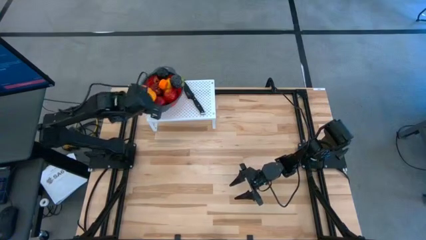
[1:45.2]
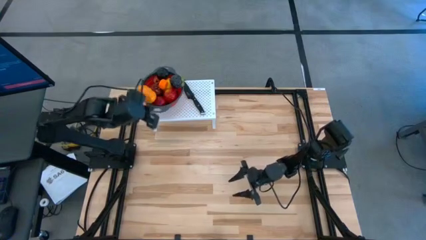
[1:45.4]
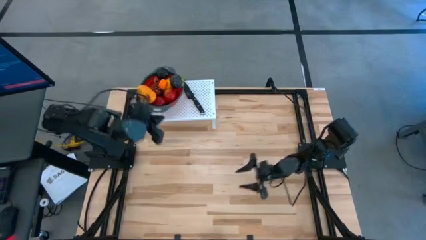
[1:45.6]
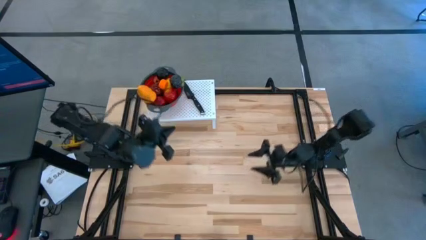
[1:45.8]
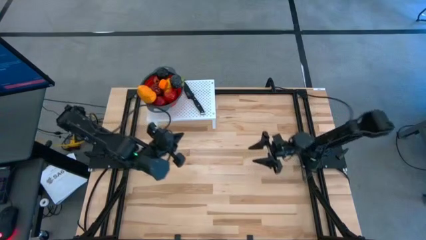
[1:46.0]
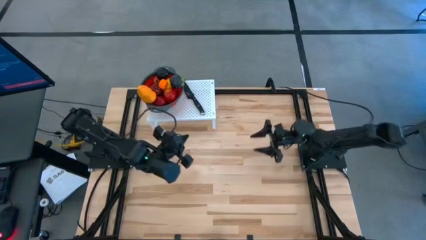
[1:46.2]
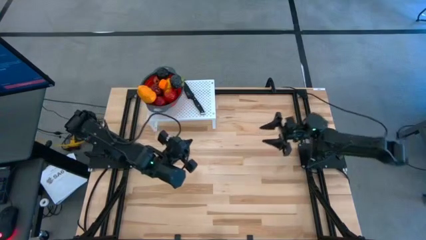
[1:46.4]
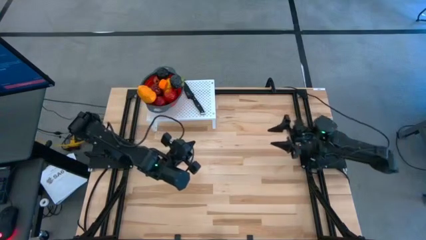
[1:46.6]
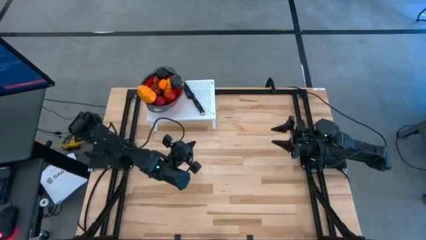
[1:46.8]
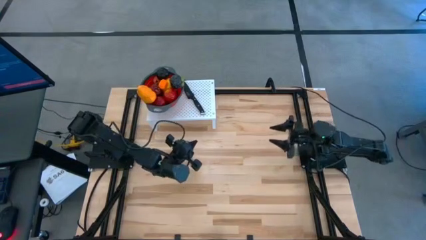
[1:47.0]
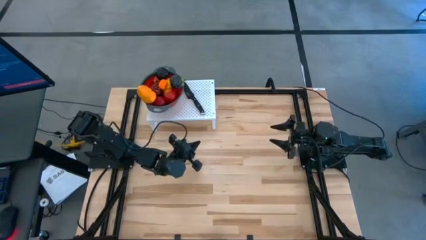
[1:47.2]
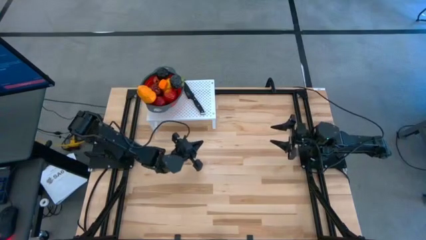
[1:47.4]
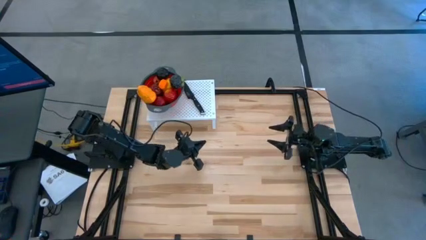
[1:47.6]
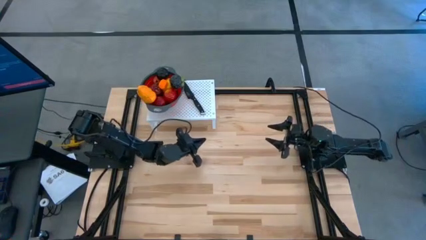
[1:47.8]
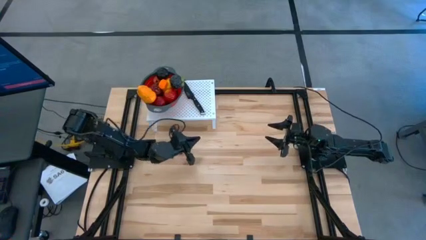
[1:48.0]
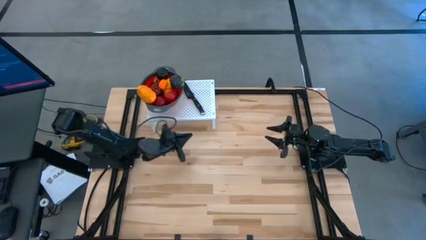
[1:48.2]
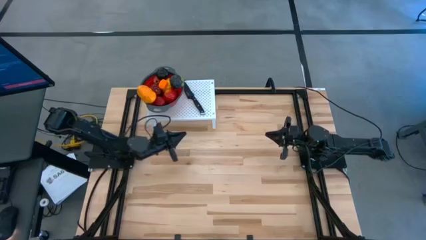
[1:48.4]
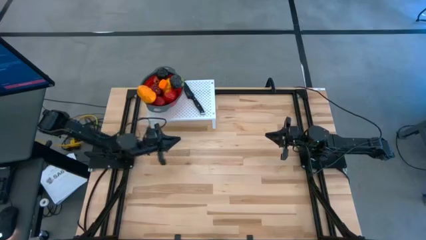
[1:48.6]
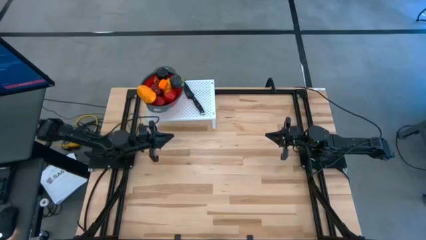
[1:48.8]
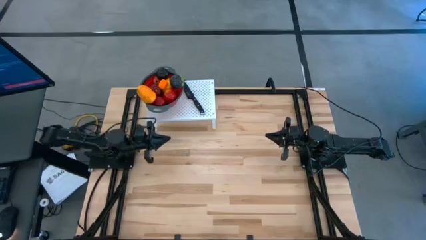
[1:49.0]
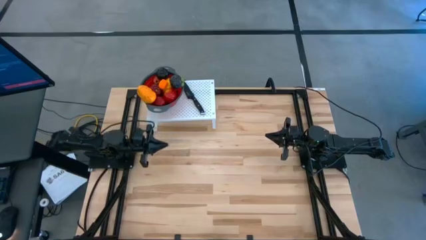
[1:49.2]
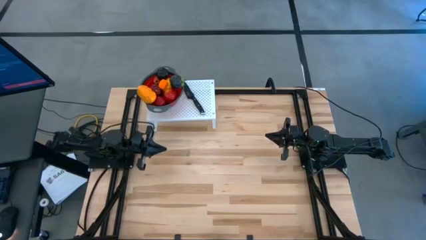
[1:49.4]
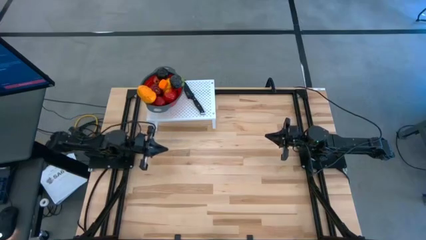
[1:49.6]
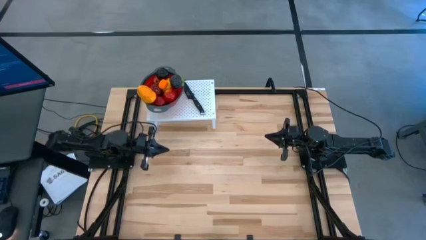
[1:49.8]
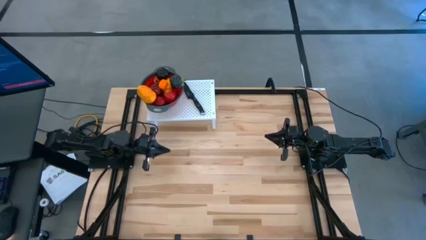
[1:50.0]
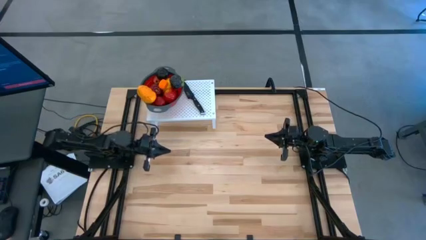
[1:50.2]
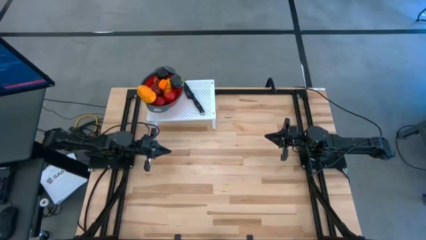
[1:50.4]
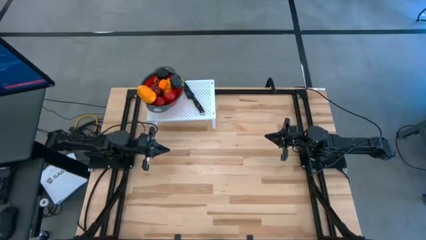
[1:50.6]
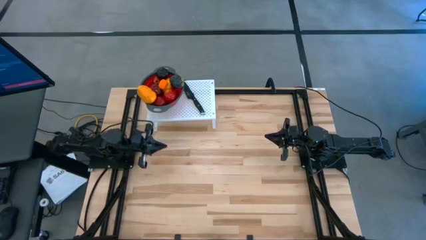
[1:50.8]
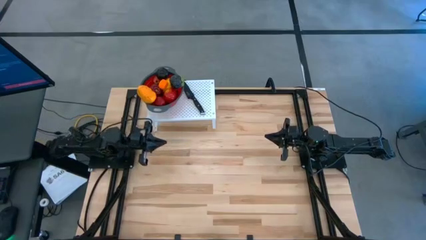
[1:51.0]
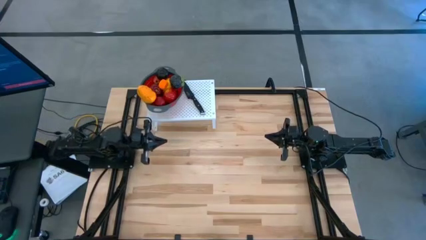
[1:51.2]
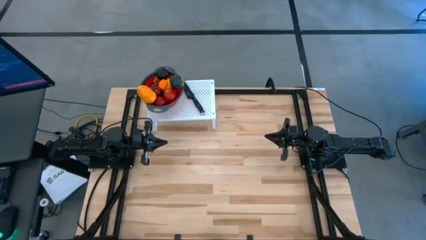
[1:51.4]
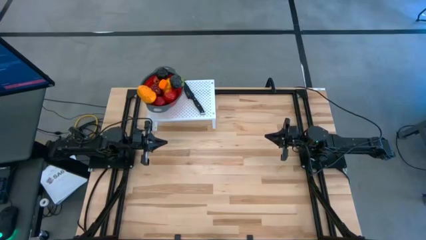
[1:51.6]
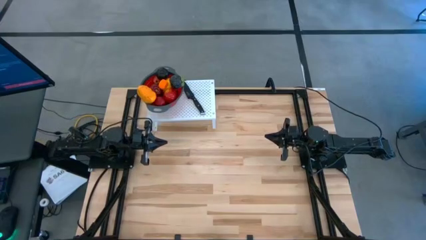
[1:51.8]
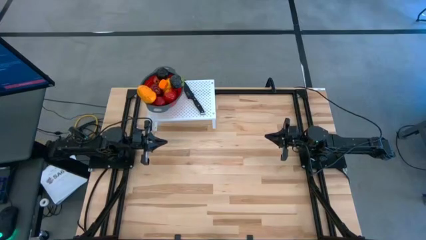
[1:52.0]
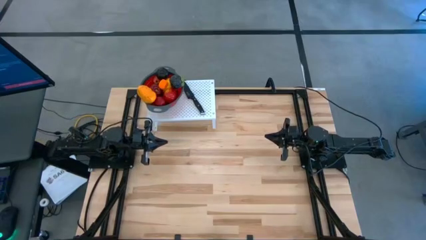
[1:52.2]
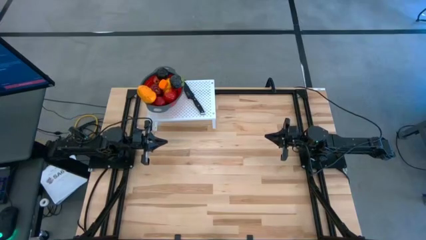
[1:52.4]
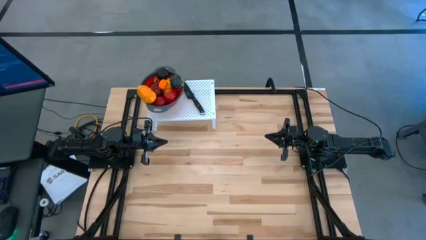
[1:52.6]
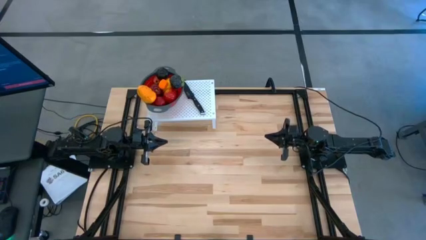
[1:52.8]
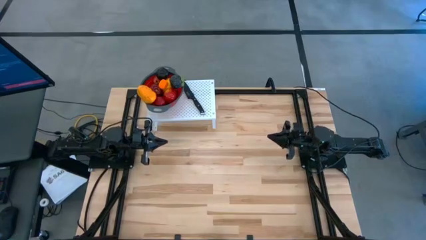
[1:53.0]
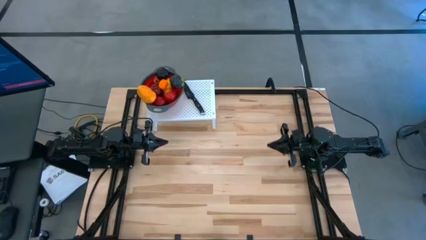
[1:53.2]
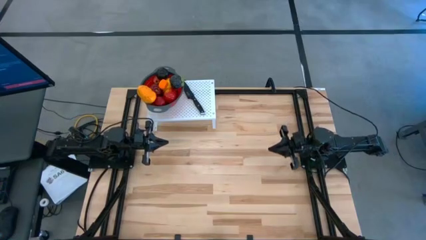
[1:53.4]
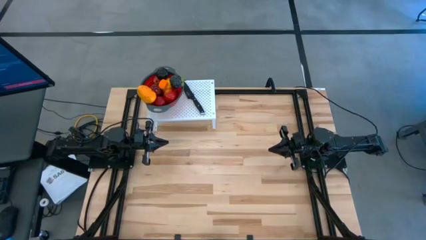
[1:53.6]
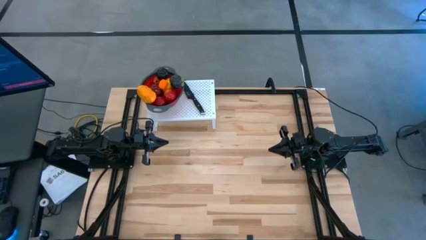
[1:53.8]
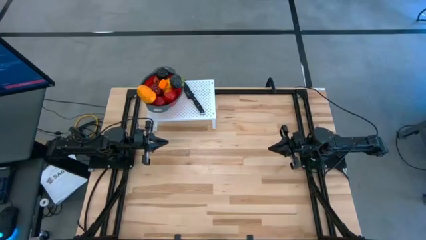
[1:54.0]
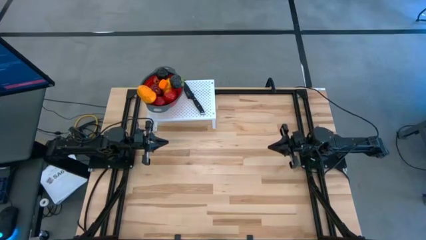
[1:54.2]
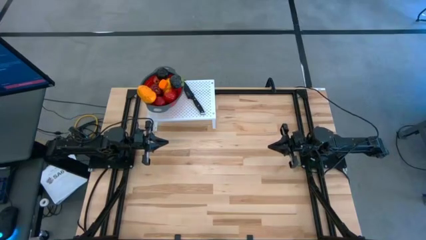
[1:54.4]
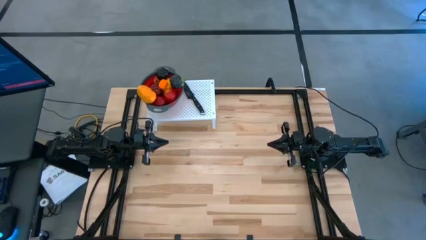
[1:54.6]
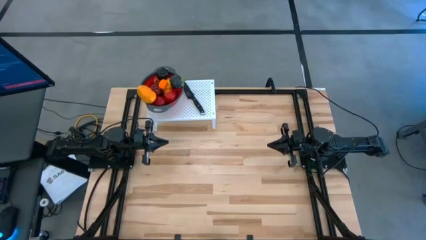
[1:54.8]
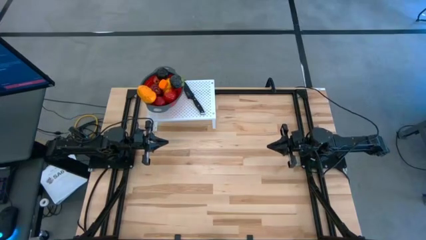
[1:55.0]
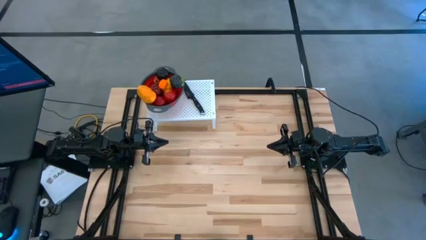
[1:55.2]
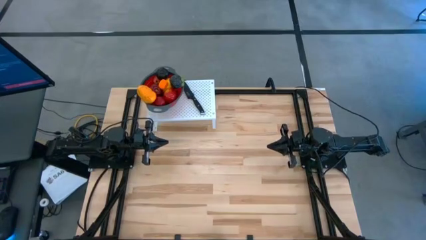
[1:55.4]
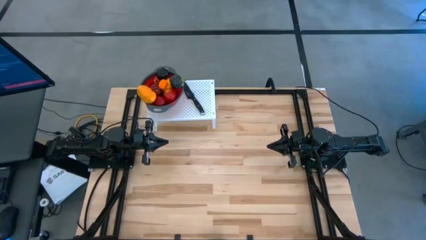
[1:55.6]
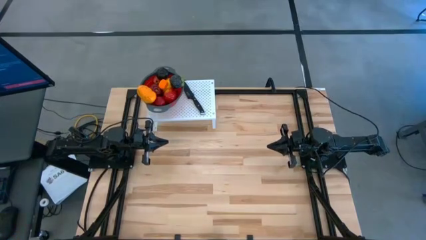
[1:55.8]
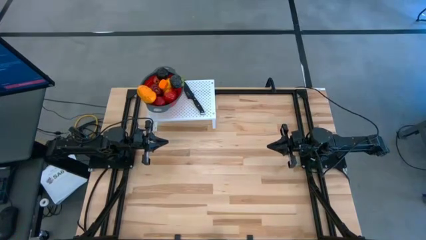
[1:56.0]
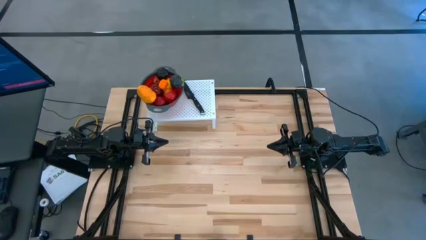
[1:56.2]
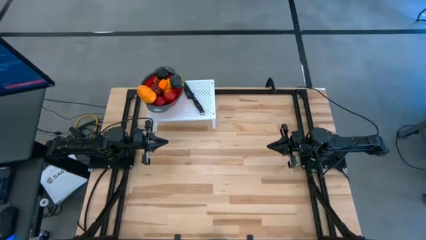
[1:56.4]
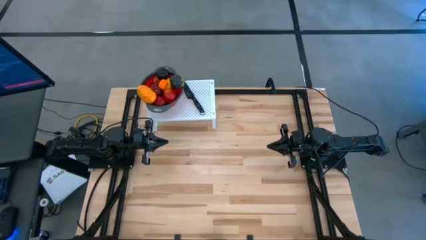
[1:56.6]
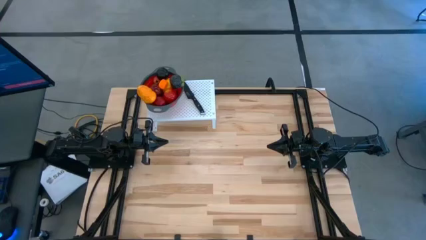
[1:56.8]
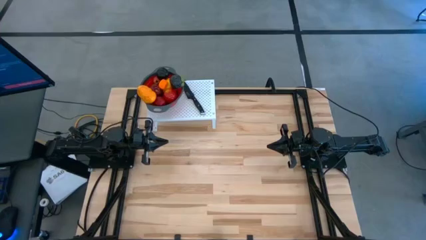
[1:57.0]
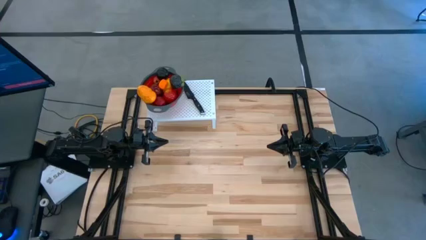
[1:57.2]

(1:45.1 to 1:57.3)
Task: Pick & Place Fruit
Return to home position
